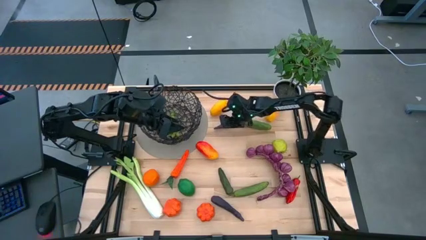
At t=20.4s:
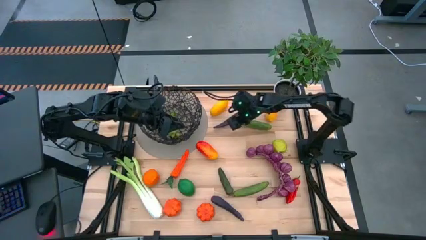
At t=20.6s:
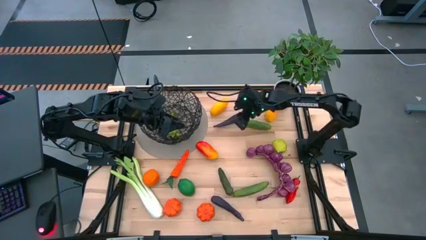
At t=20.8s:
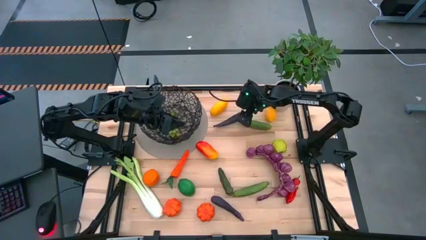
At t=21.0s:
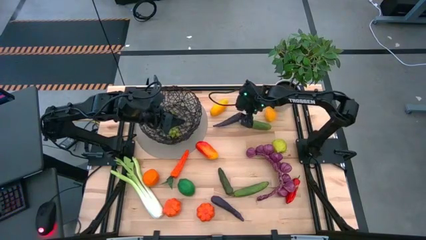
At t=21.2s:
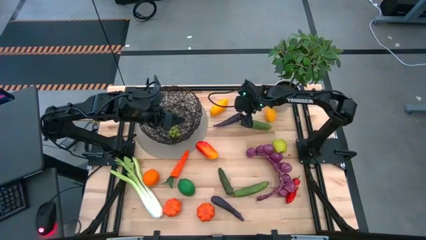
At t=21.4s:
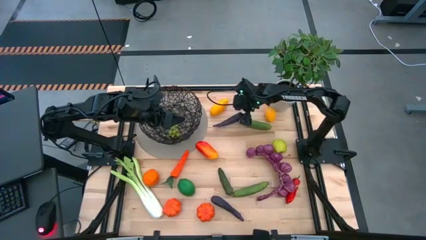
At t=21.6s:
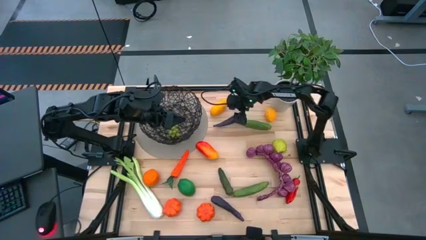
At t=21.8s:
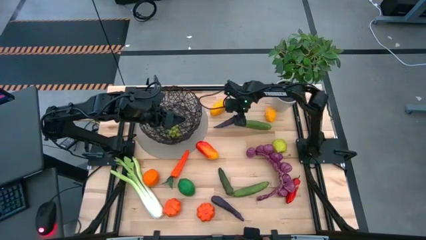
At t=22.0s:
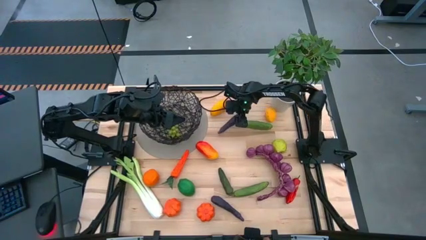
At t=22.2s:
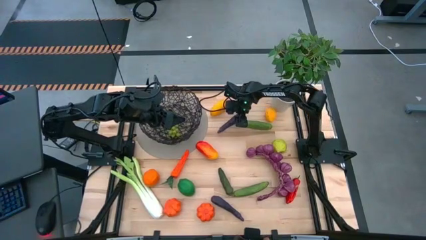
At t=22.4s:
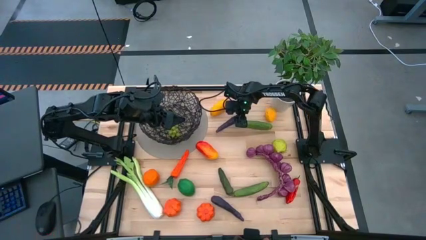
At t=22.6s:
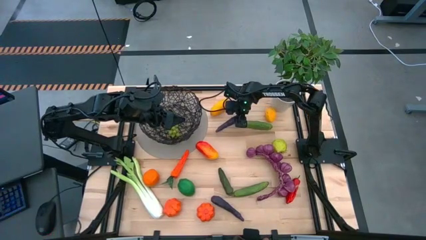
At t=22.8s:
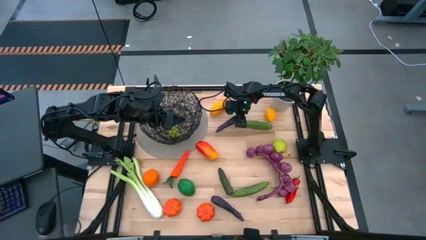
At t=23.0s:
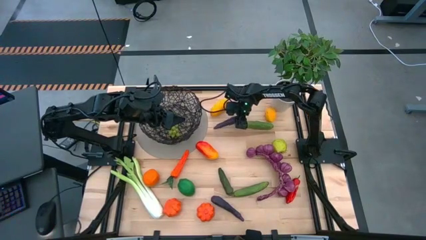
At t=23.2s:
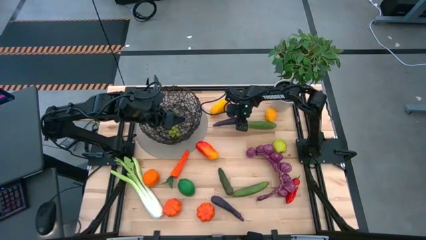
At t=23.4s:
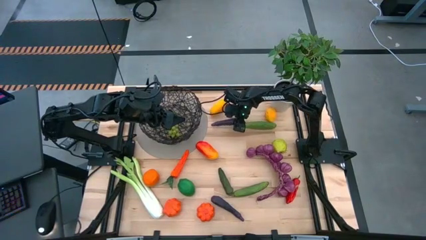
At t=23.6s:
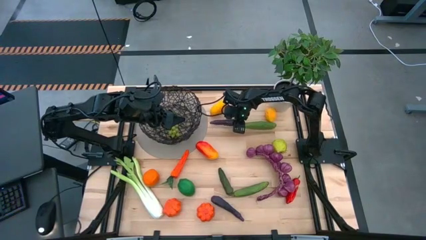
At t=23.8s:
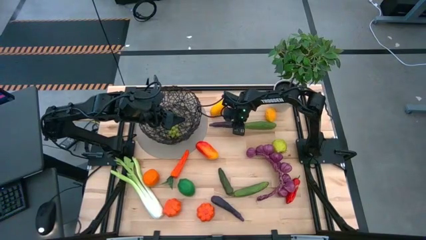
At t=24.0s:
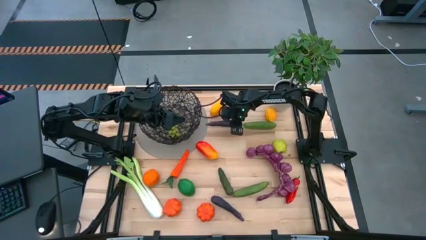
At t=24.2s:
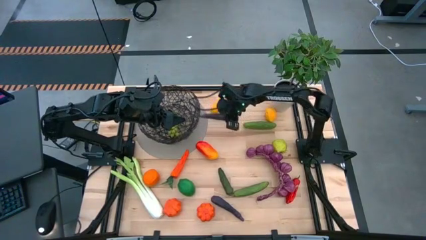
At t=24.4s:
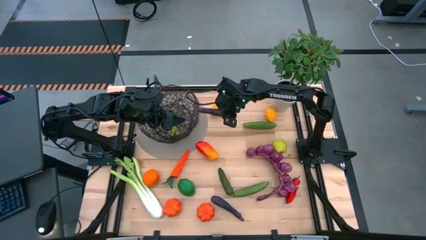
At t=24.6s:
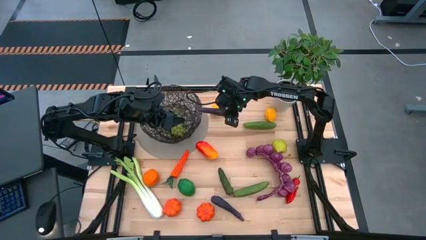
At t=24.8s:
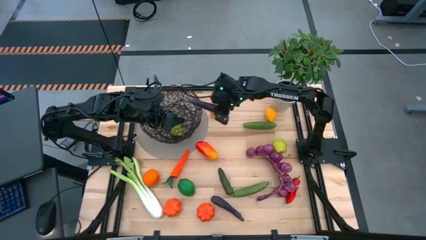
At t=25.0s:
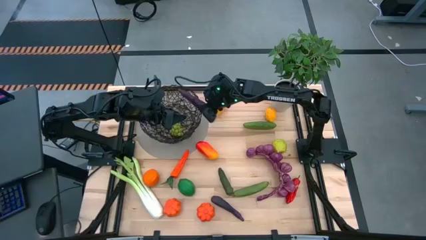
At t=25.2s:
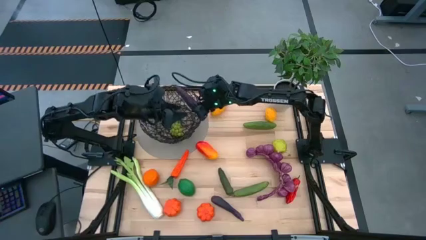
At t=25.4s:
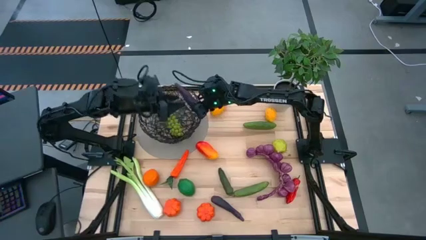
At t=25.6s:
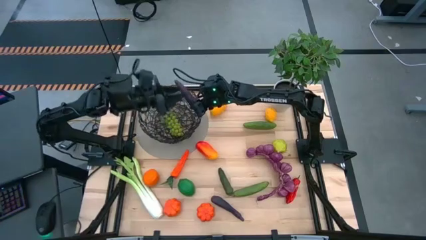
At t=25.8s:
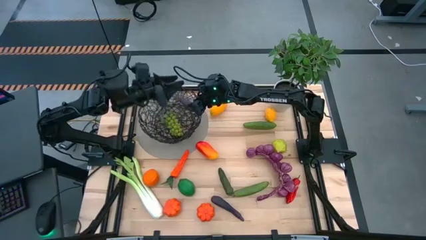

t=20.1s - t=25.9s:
Task: Build produce basket
Put the top purple eggplant into the black wire basket

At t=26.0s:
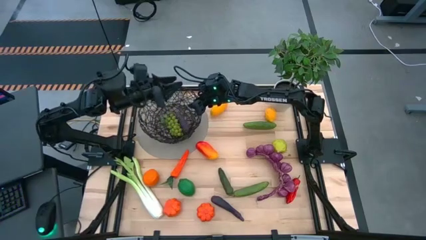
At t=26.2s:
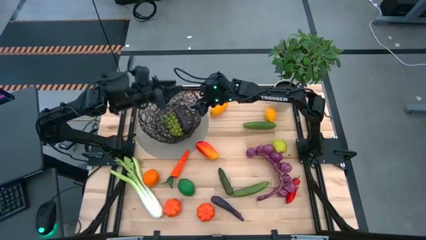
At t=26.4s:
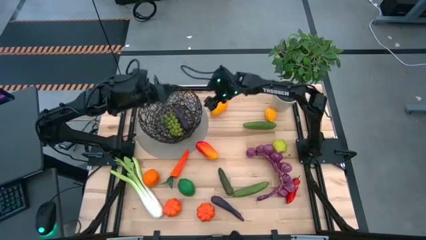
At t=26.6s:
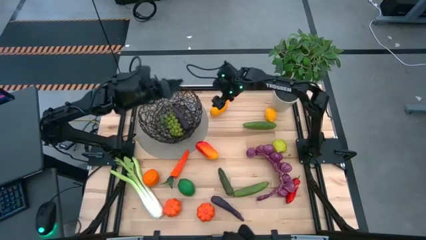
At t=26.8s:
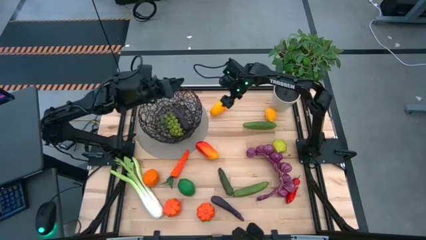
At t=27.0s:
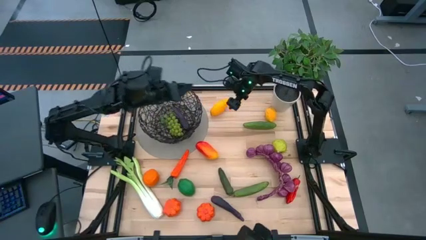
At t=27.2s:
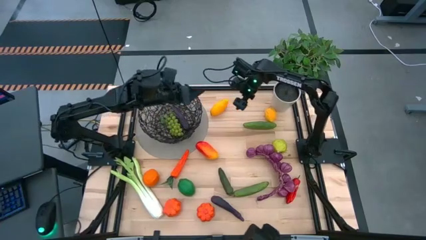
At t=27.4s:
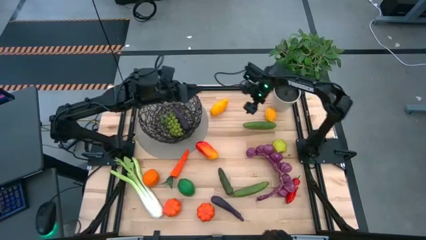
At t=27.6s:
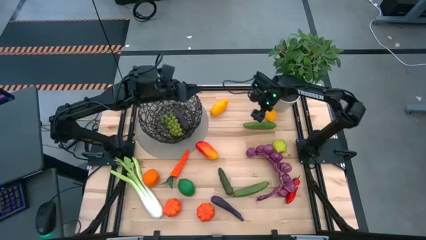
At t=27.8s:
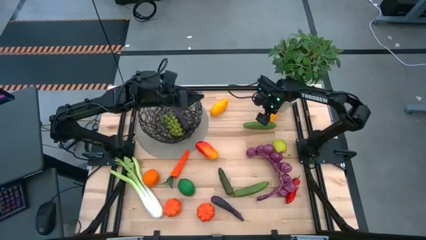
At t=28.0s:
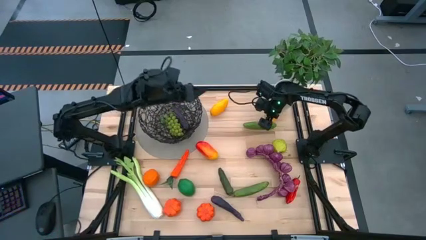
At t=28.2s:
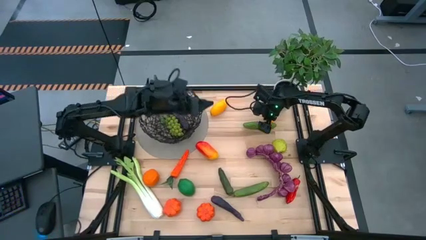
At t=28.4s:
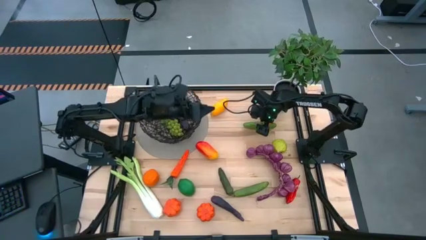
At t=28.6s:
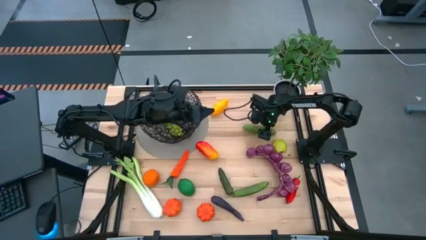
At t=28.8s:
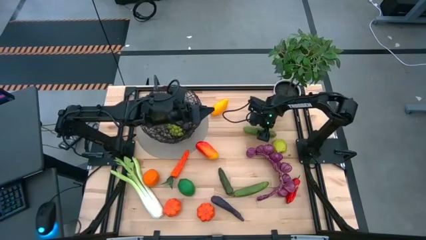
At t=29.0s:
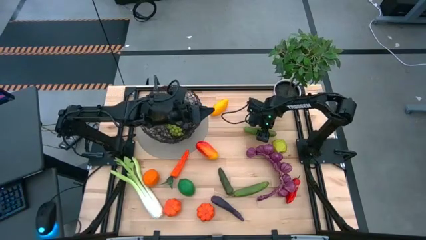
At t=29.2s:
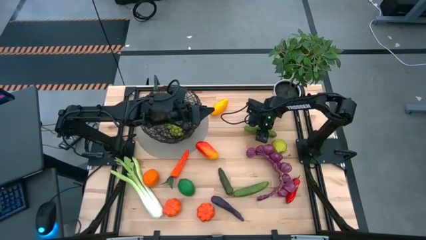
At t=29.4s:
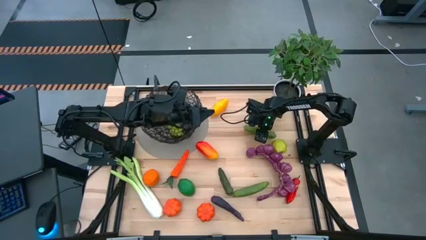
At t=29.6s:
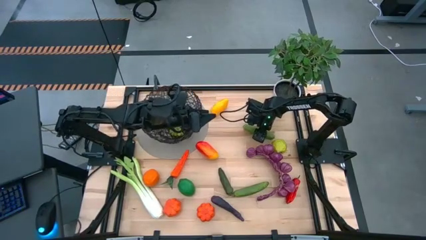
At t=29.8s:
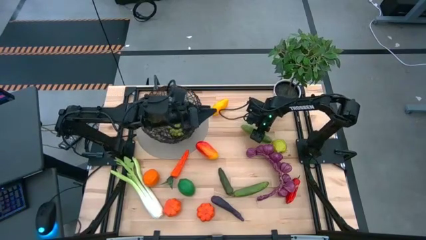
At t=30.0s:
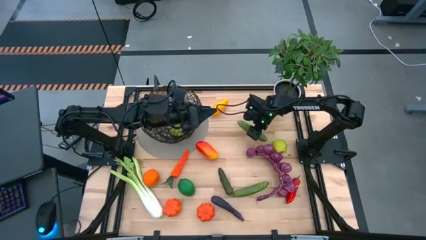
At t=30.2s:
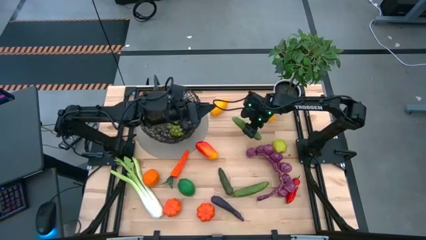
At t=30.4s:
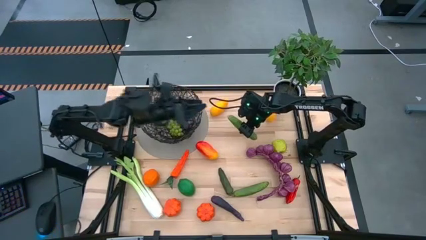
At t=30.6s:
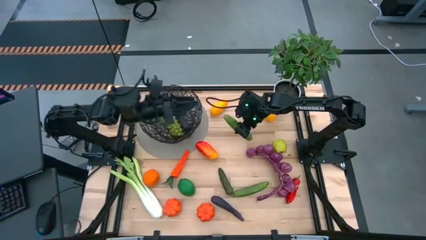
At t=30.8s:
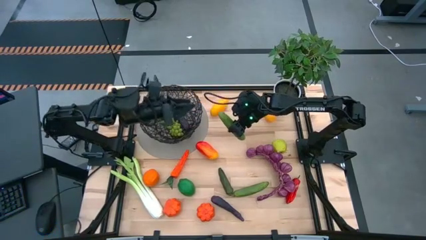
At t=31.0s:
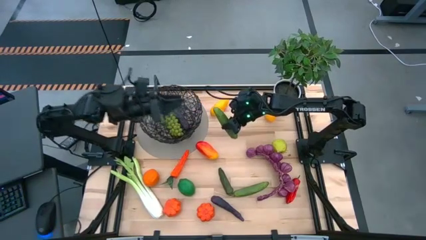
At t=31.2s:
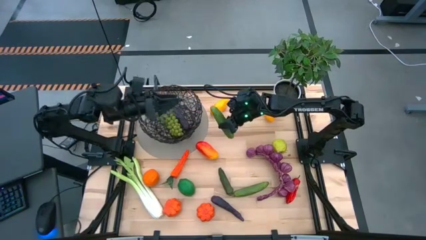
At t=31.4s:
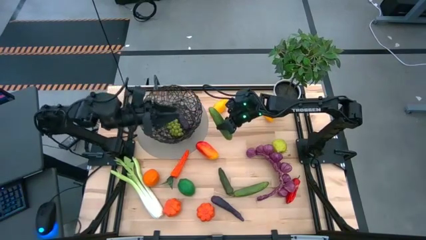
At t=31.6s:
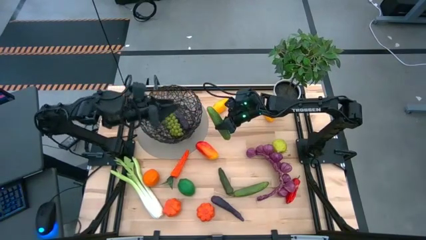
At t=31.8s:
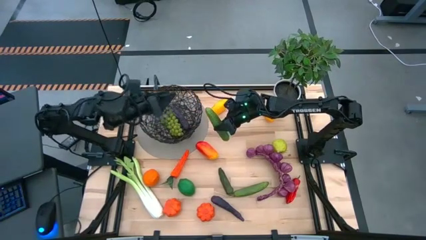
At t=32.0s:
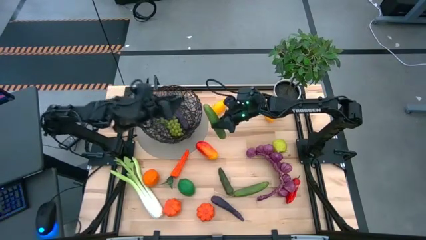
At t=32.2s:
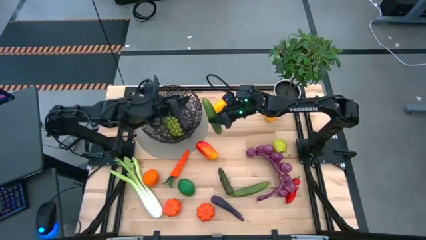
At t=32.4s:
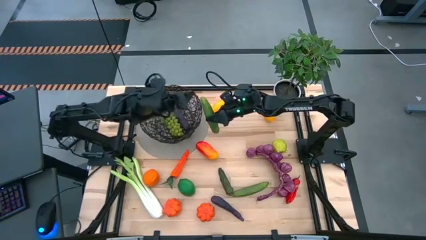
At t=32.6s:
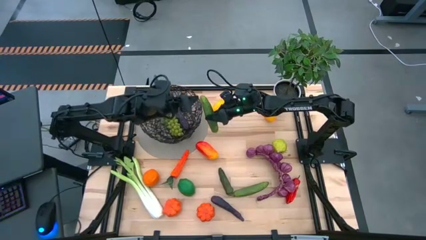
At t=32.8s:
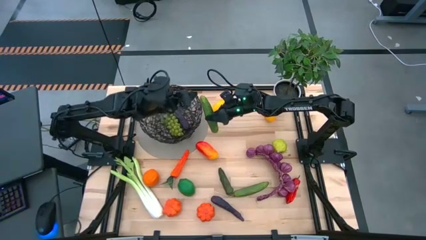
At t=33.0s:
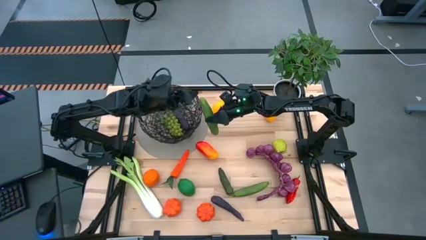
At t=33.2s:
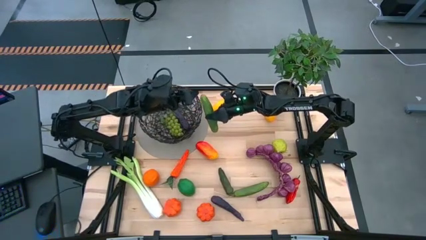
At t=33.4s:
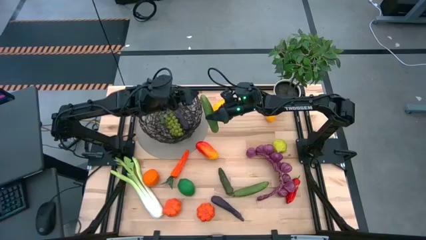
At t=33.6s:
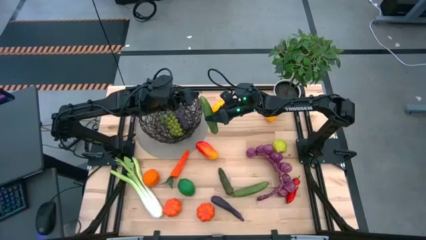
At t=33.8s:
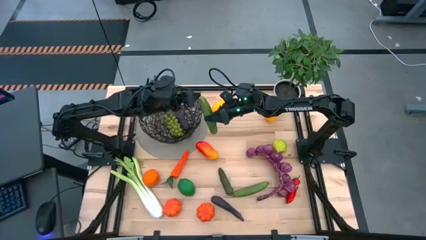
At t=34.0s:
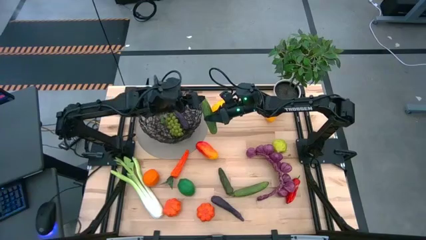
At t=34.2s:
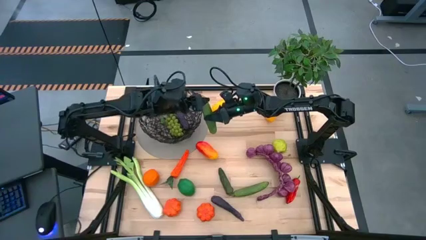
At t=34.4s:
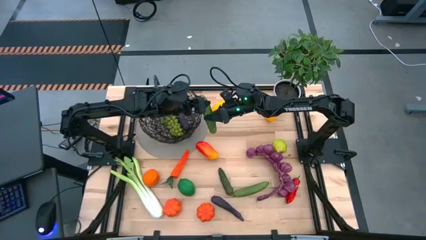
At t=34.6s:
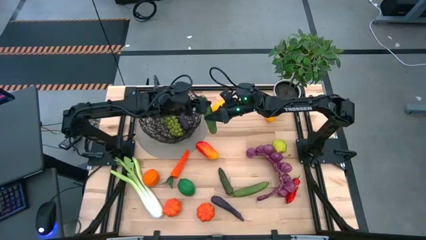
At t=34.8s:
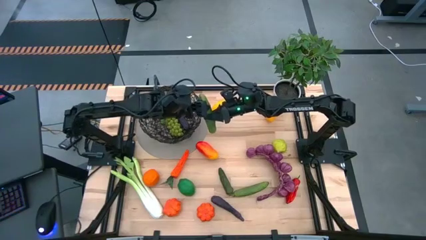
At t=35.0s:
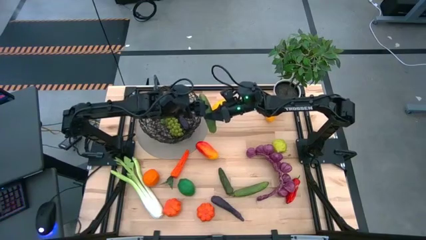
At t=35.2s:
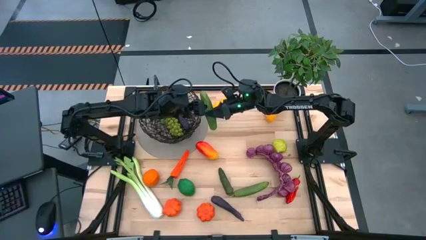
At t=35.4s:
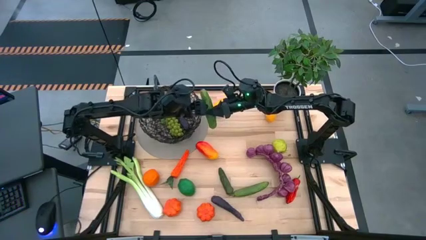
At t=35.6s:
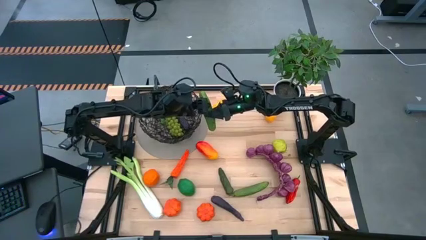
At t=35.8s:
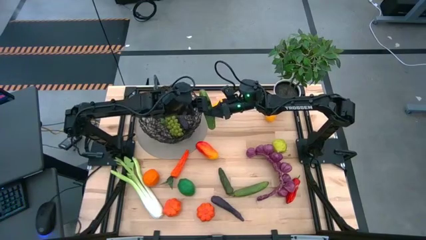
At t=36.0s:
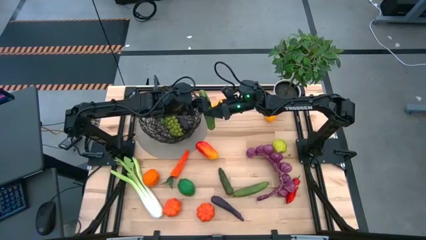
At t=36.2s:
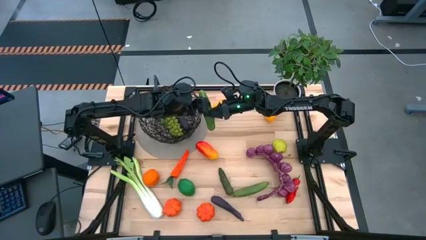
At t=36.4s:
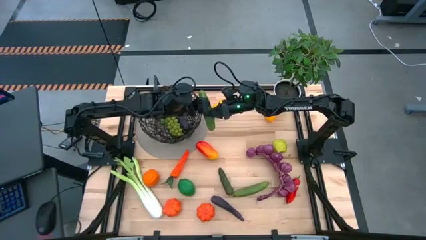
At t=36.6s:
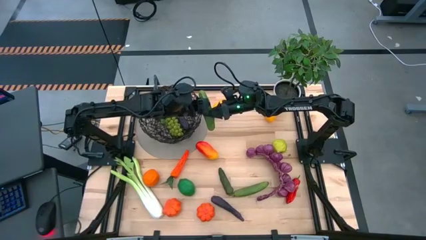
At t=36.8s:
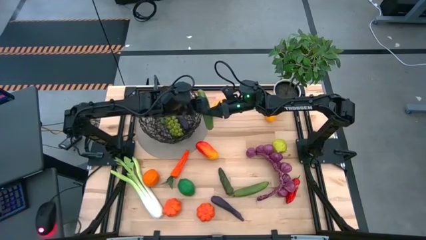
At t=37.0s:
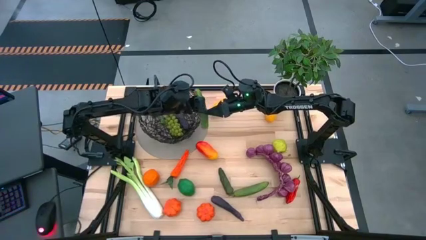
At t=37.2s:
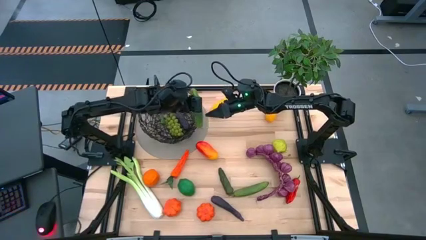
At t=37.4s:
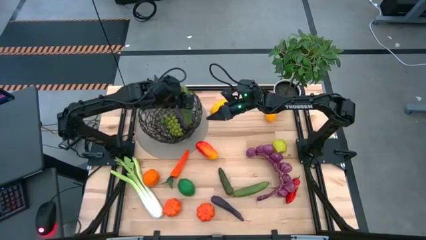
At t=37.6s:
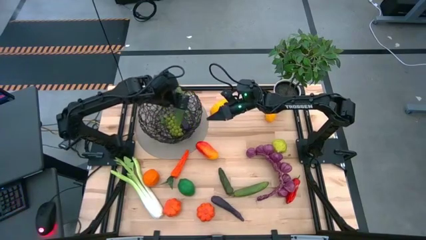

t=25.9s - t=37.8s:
Put the top green cucumber into the black wire basket
